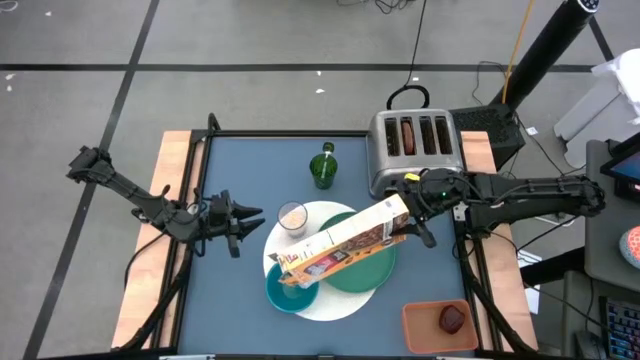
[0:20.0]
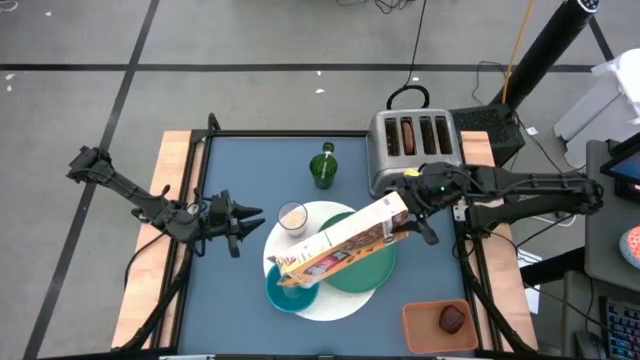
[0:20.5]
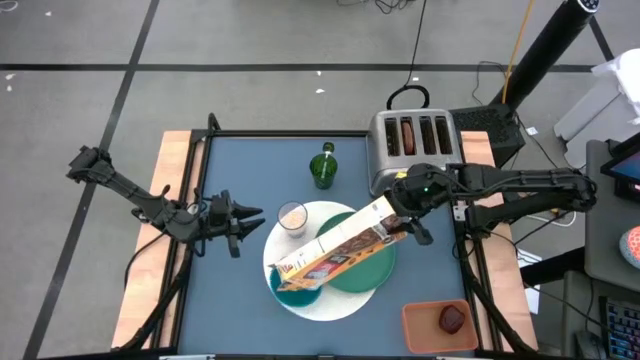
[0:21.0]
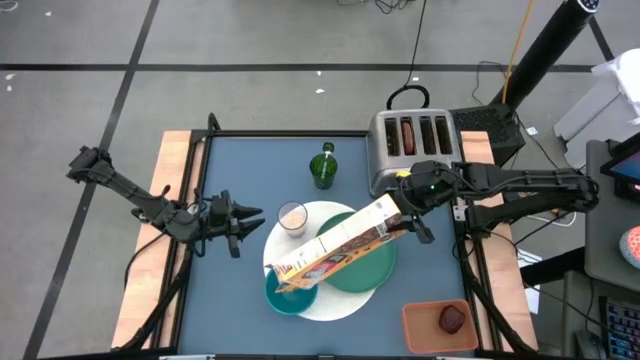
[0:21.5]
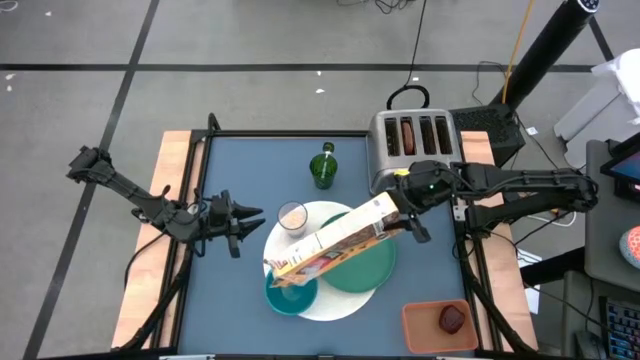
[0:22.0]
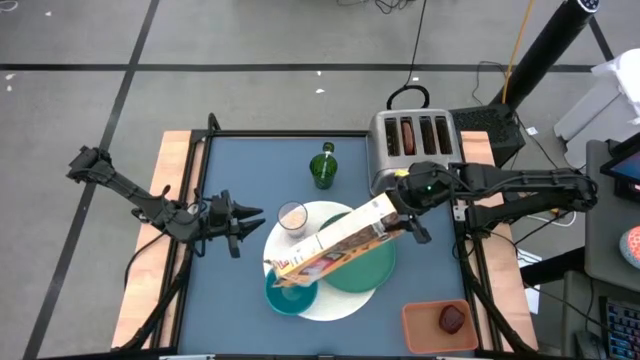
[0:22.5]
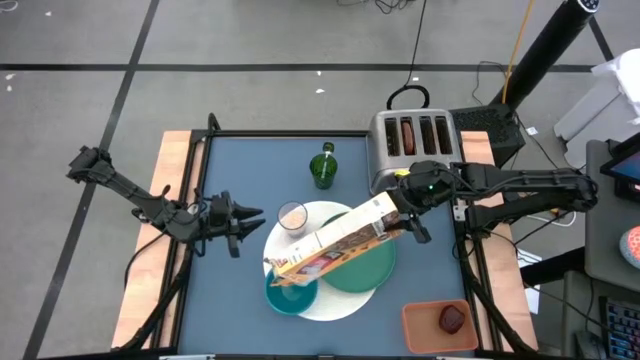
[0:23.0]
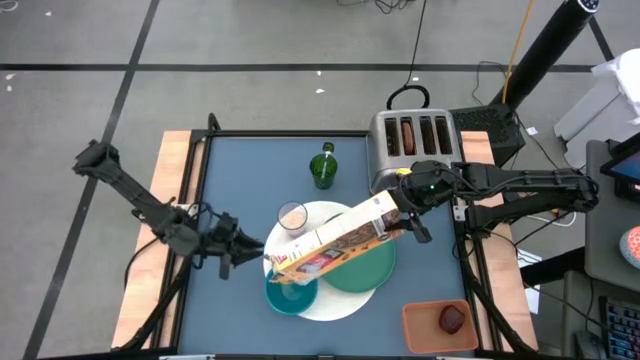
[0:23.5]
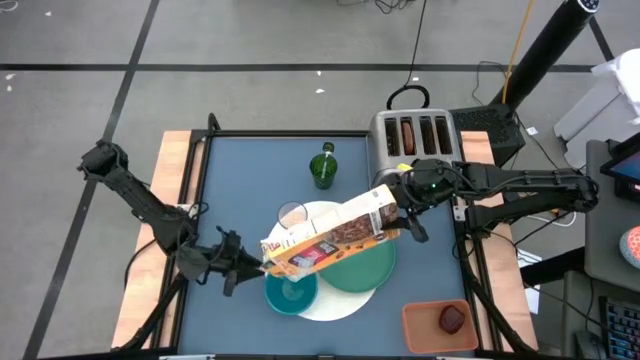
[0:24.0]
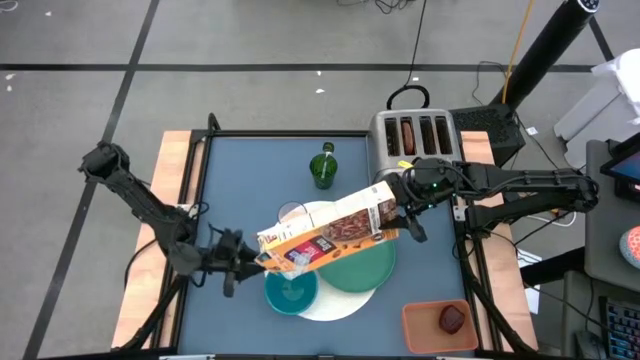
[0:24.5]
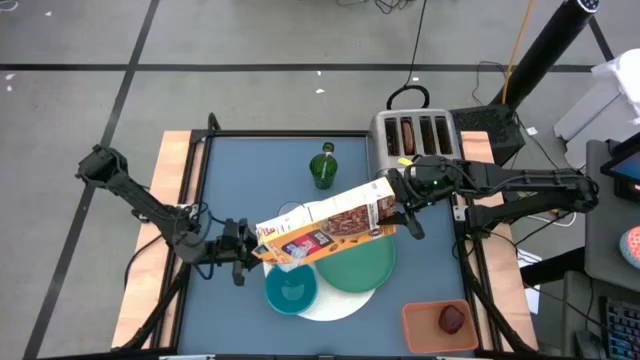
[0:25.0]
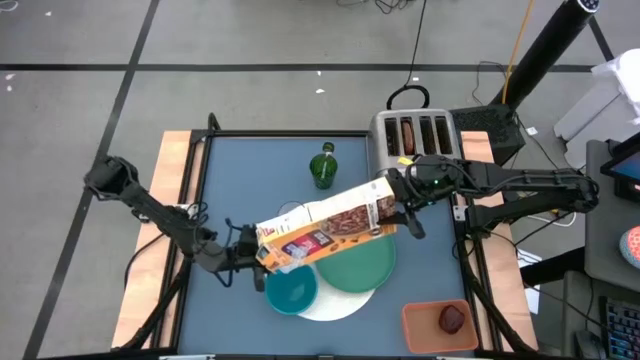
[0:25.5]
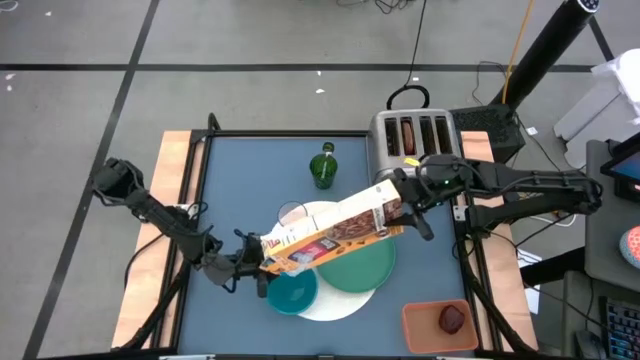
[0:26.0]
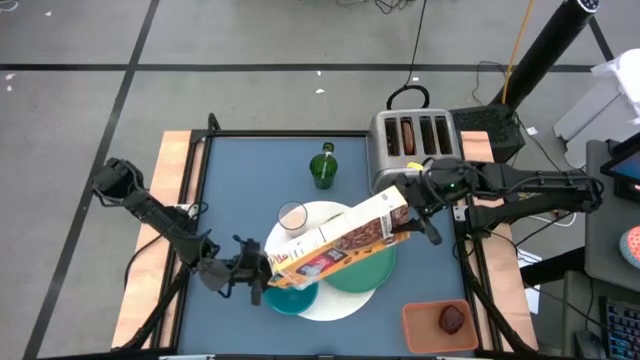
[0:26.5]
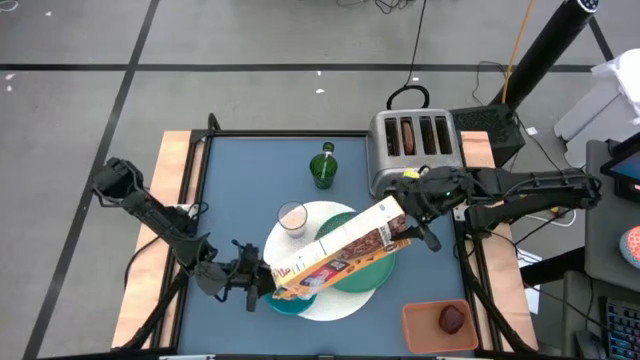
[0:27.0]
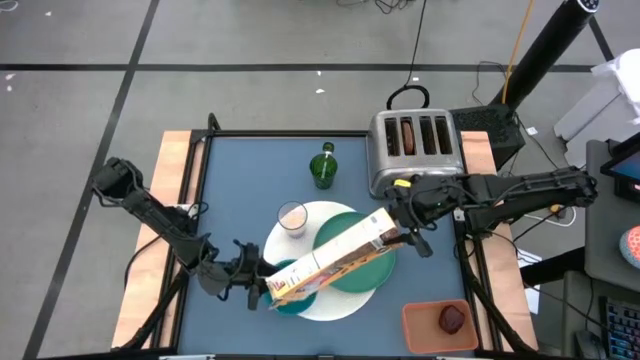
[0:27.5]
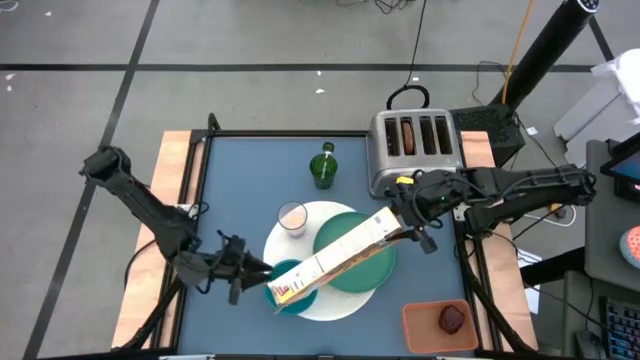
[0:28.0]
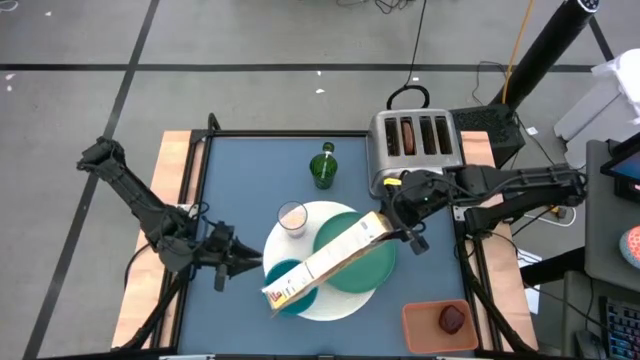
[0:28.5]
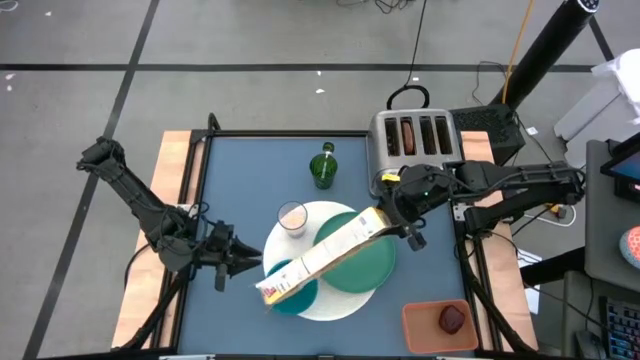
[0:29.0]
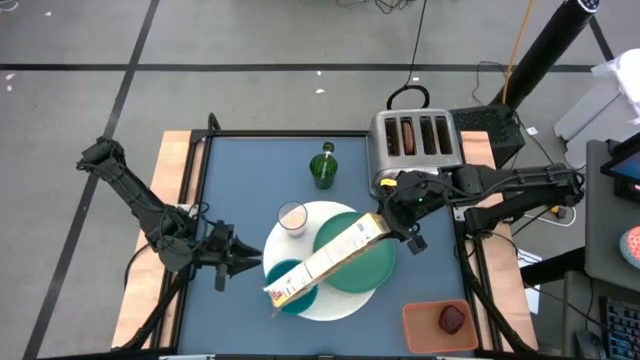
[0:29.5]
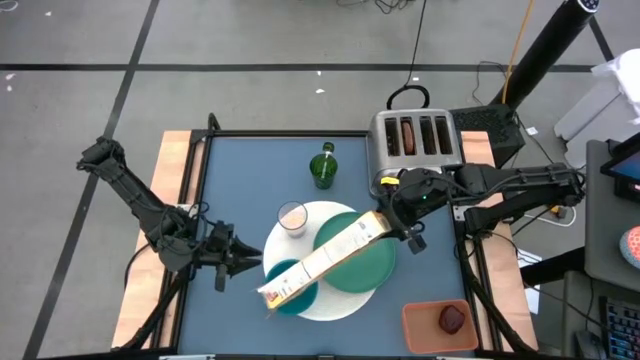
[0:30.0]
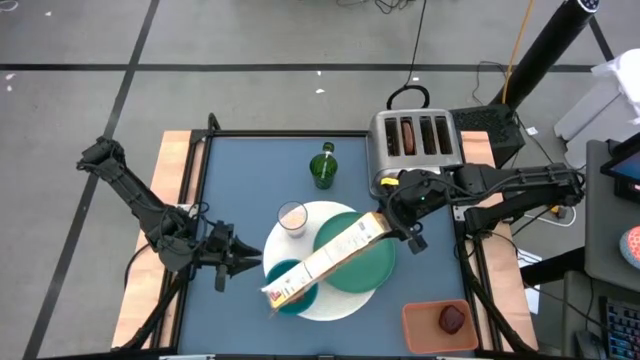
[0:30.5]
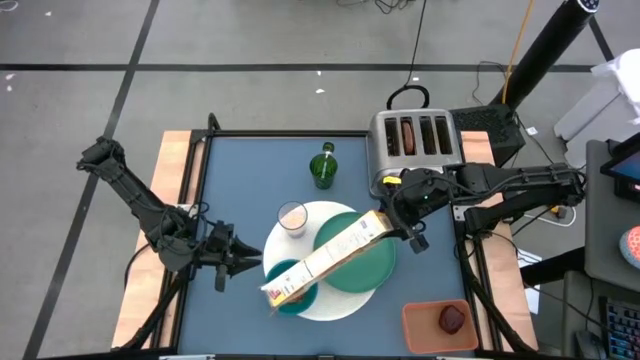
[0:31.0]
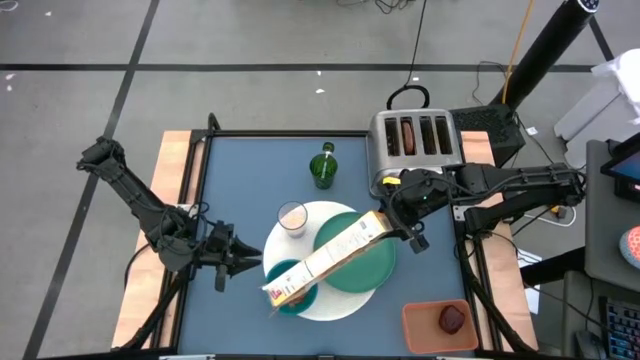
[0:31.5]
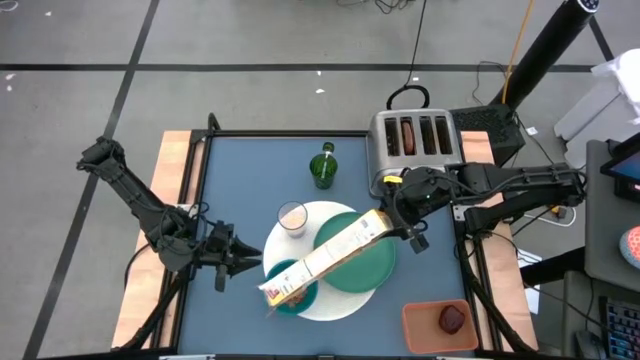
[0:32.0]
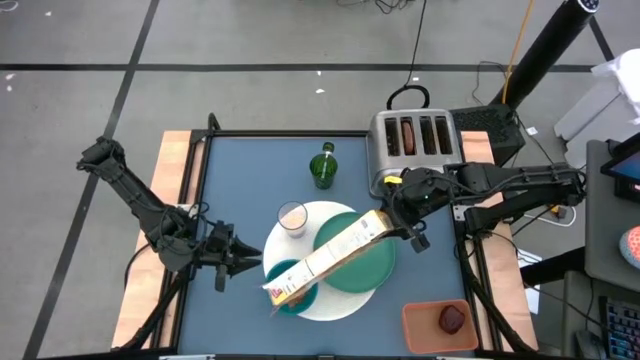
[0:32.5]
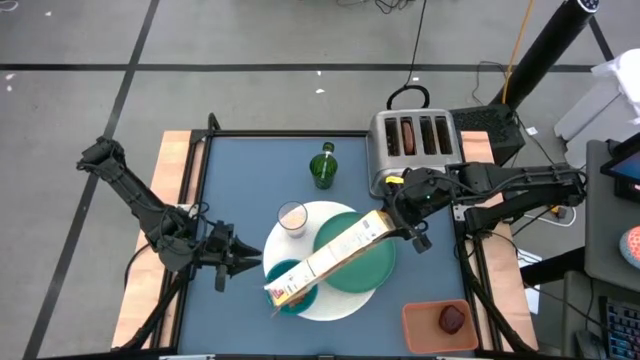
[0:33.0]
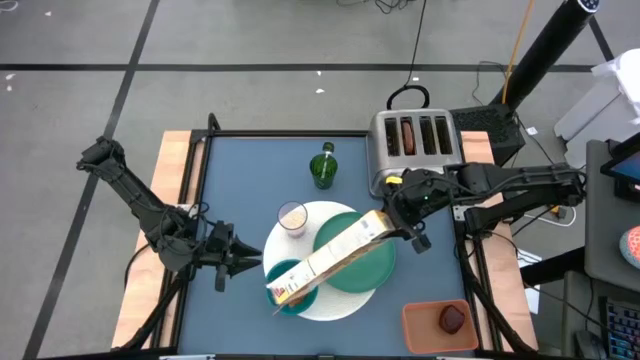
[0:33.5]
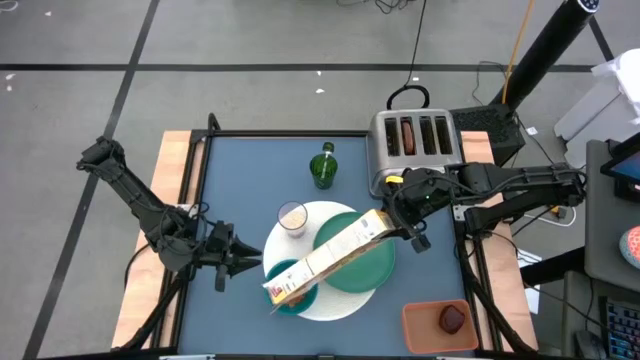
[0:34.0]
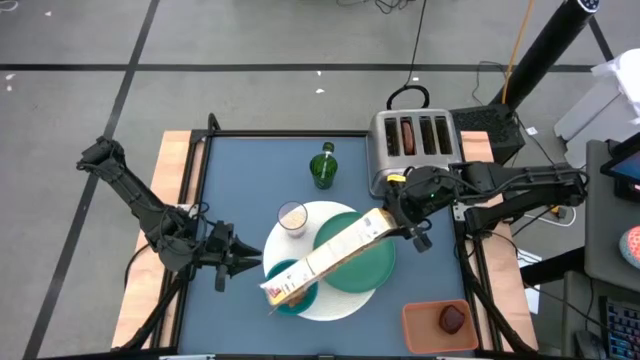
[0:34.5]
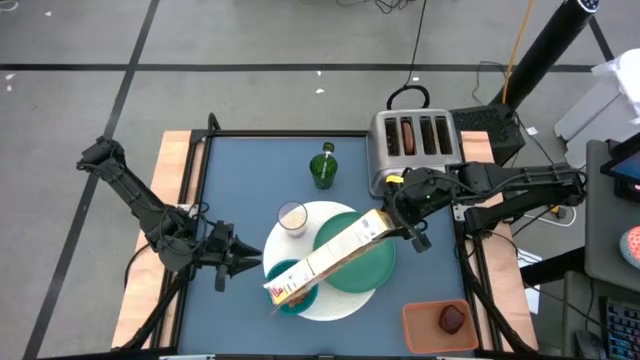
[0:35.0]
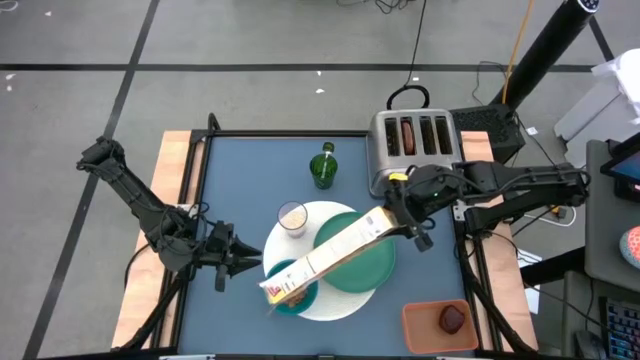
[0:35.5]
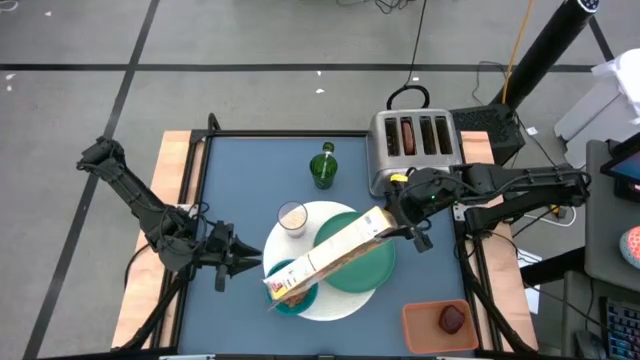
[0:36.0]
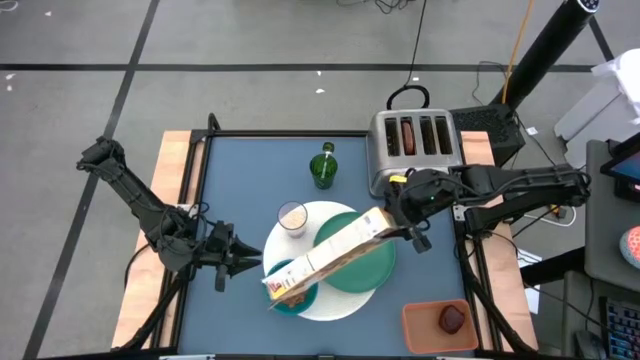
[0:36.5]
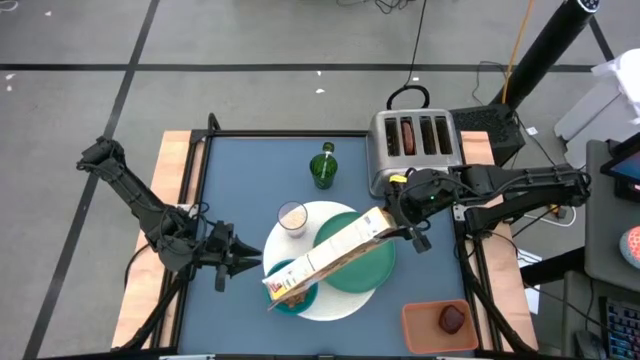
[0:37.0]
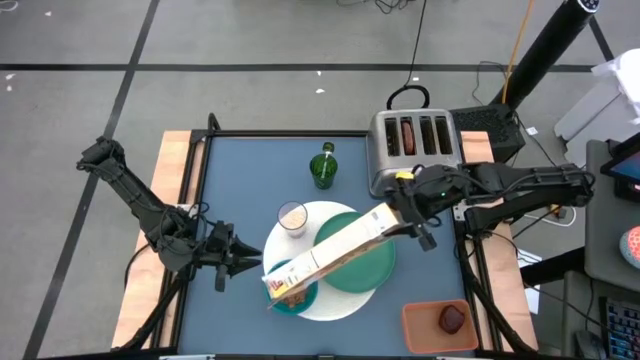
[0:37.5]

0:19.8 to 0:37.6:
Task: Arrange a breakfast setting
Pour the cereal from the cereal box into the blue bowl

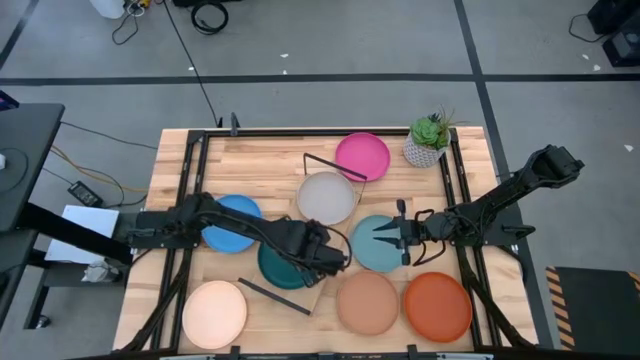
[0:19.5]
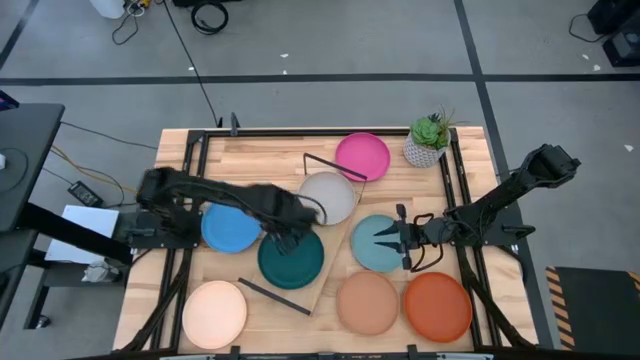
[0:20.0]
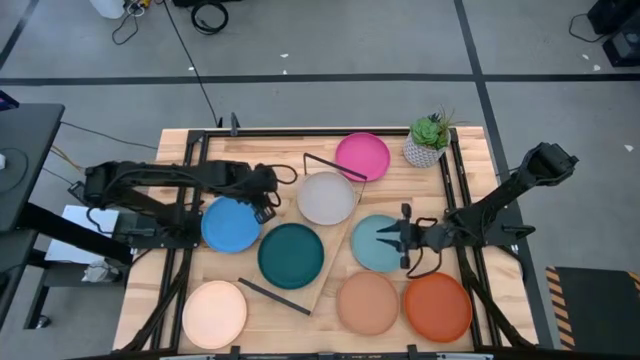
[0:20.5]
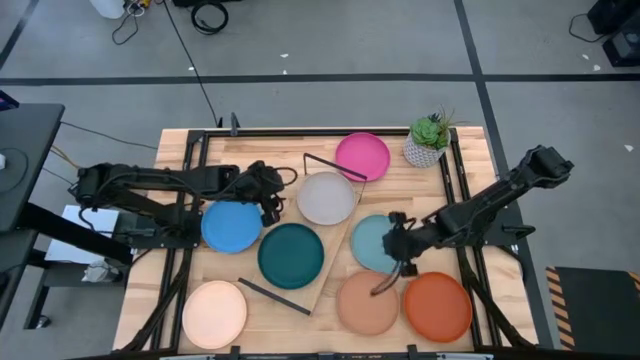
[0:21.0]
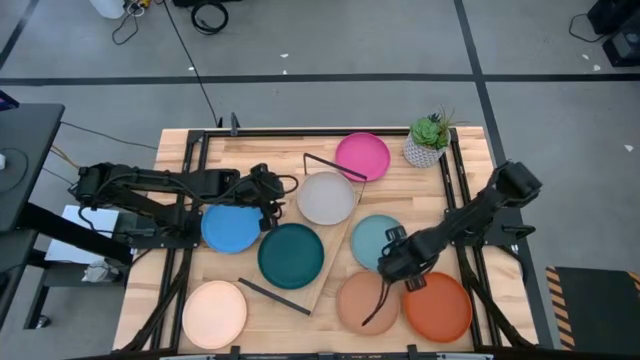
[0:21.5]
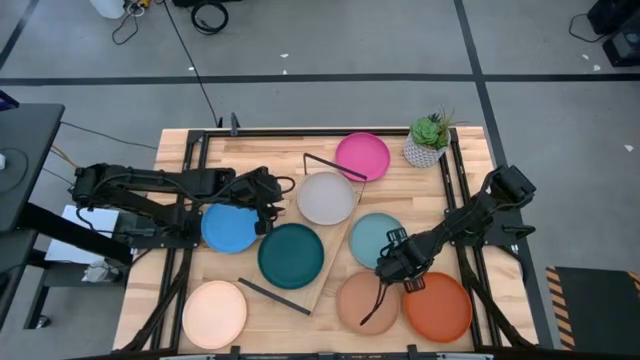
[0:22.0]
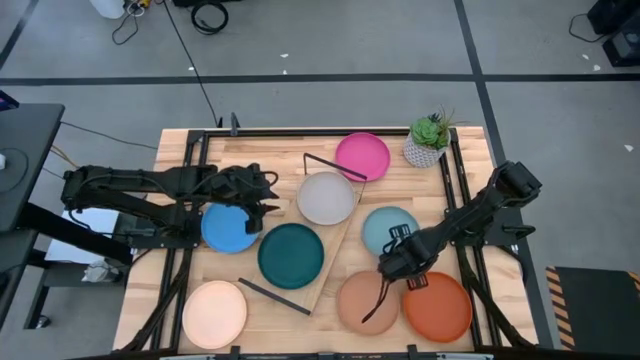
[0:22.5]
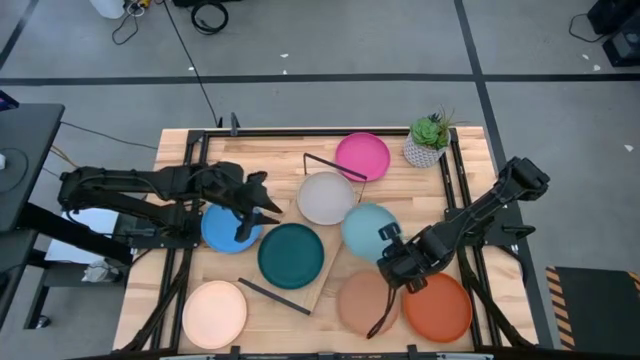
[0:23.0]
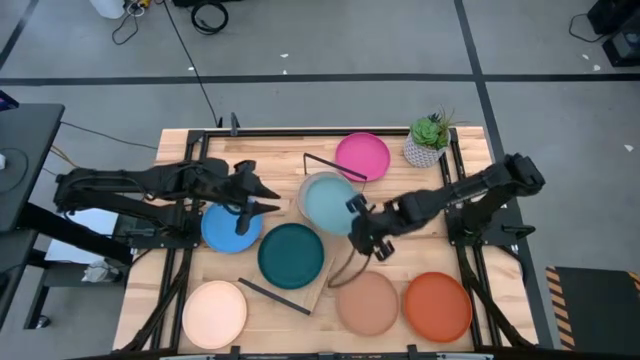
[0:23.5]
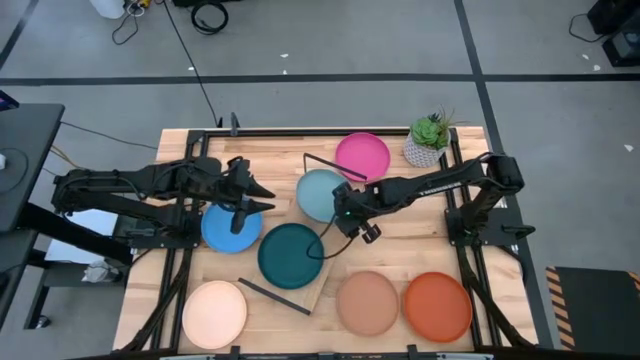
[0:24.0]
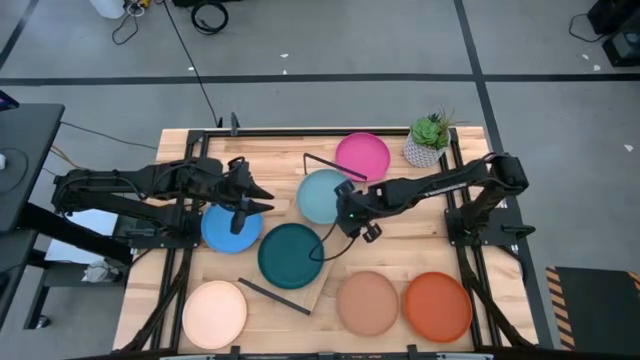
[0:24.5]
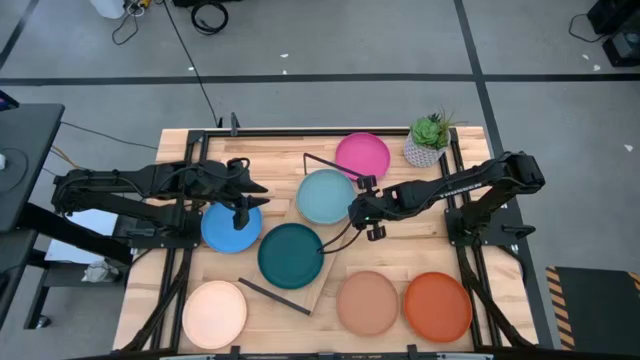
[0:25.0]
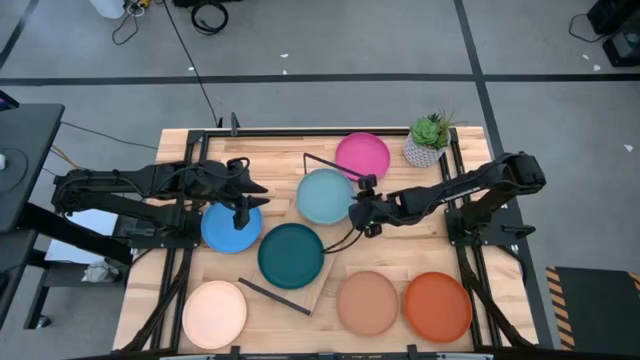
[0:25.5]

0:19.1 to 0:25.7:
Task: Place and stack plates onto a shelf
Stack the light blue plate on top of the gray plate
